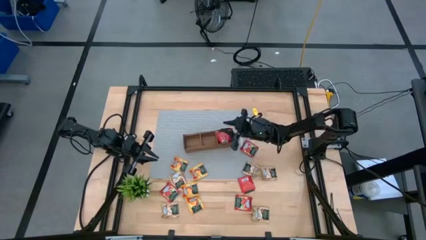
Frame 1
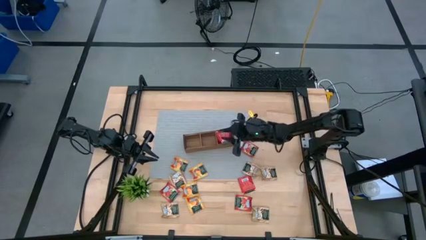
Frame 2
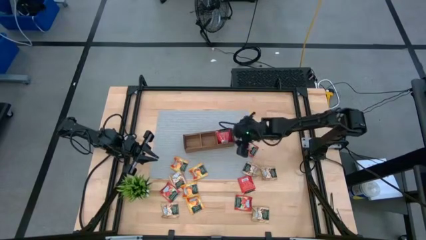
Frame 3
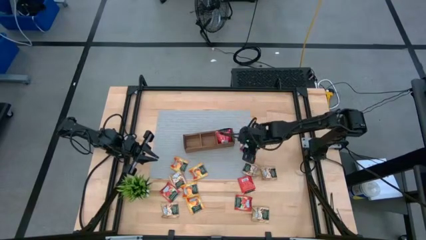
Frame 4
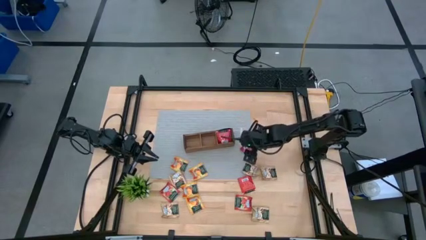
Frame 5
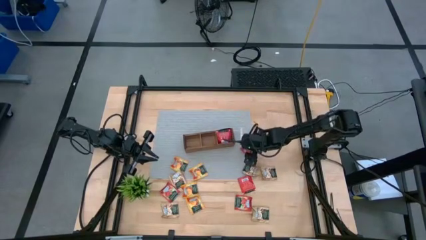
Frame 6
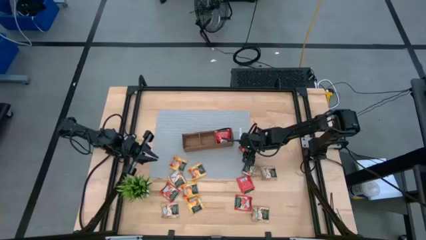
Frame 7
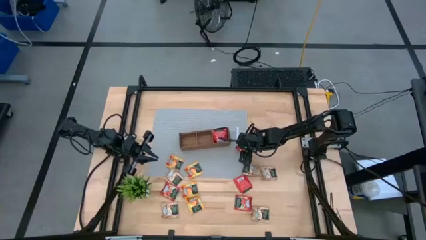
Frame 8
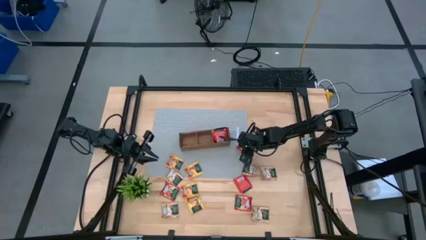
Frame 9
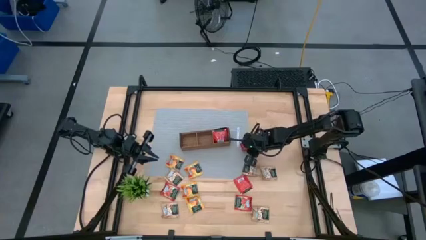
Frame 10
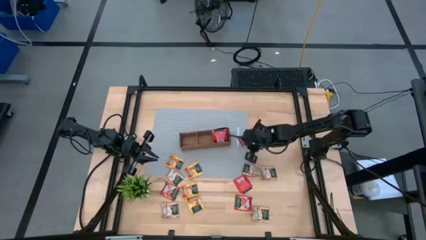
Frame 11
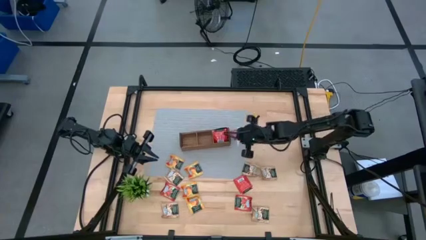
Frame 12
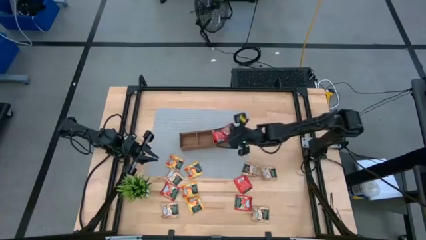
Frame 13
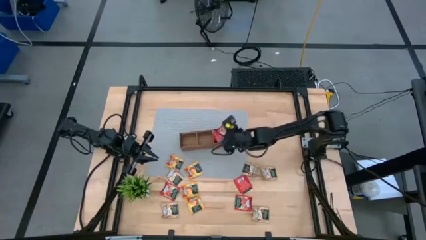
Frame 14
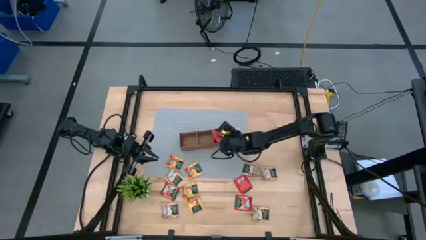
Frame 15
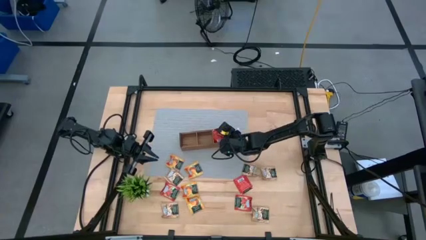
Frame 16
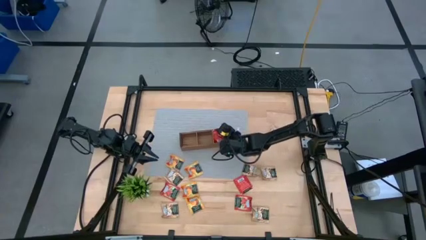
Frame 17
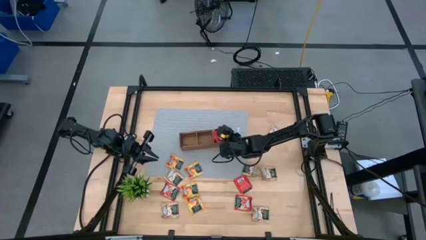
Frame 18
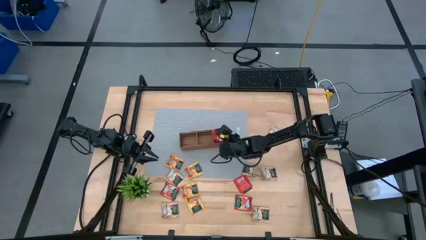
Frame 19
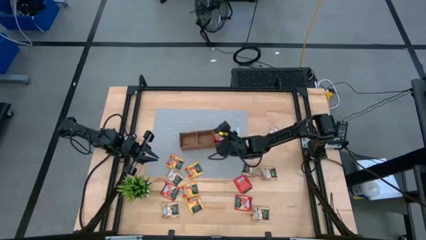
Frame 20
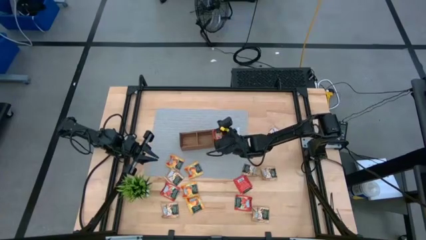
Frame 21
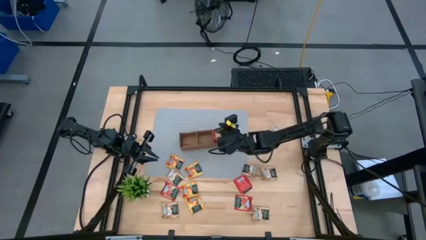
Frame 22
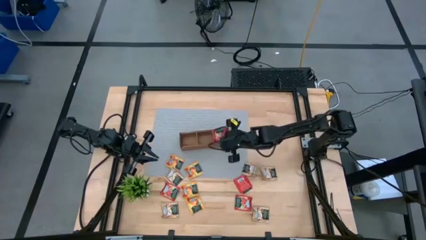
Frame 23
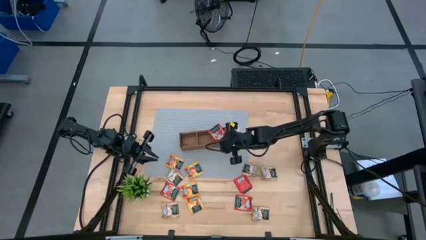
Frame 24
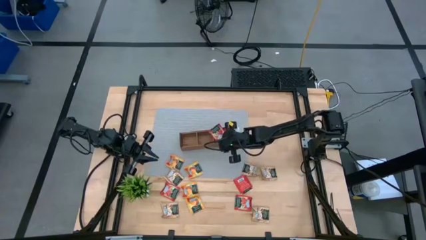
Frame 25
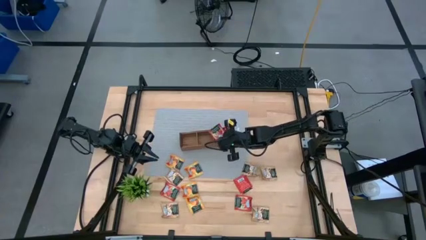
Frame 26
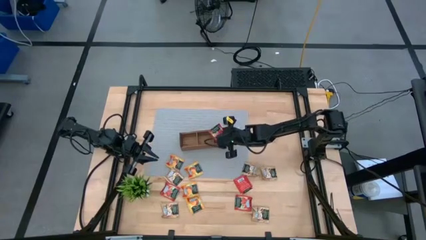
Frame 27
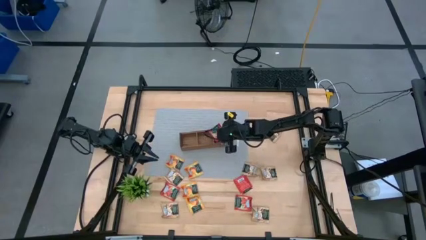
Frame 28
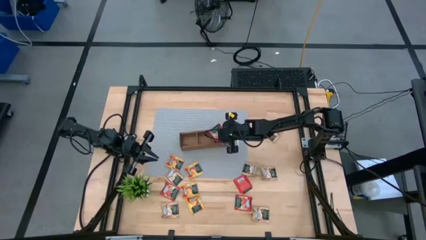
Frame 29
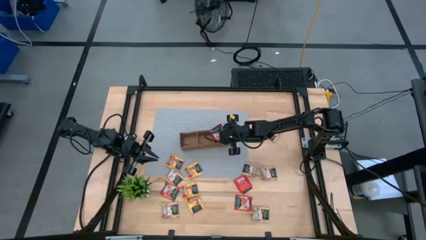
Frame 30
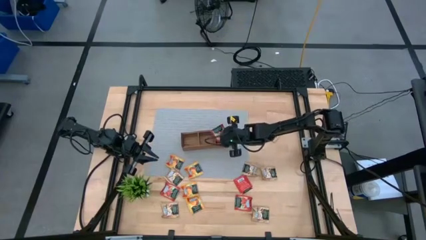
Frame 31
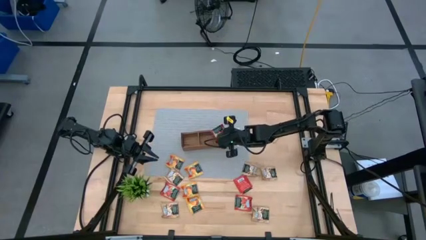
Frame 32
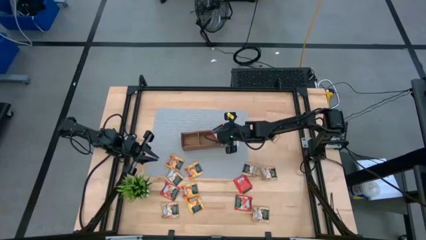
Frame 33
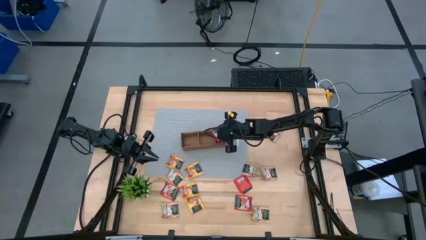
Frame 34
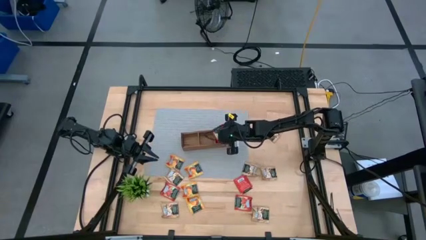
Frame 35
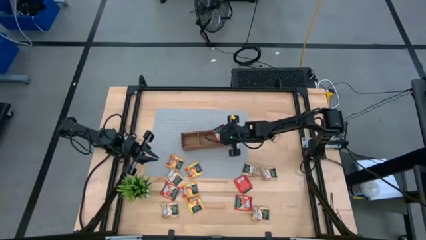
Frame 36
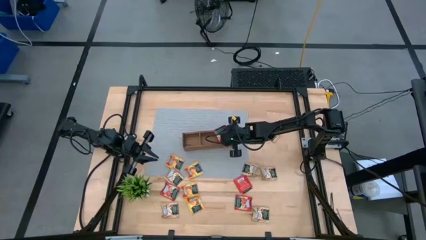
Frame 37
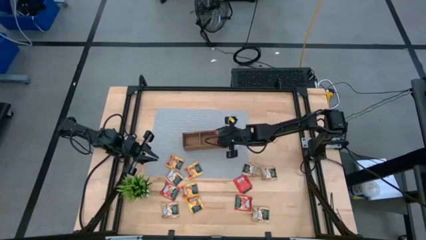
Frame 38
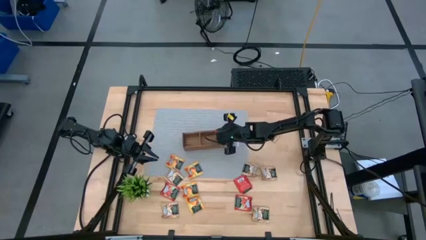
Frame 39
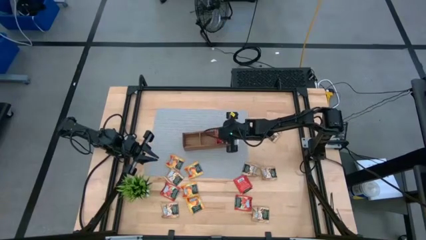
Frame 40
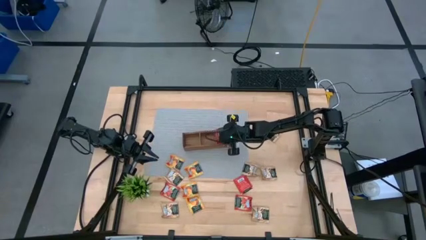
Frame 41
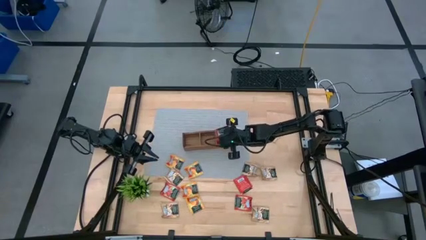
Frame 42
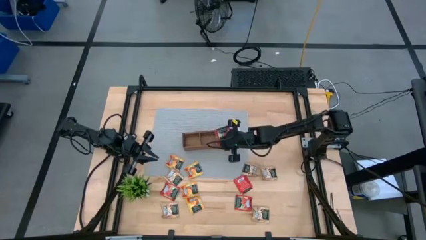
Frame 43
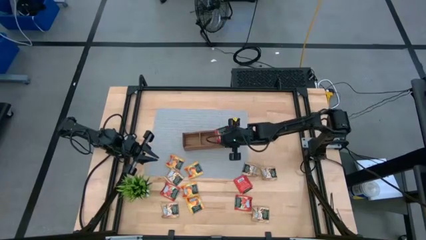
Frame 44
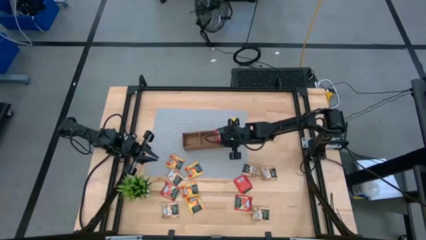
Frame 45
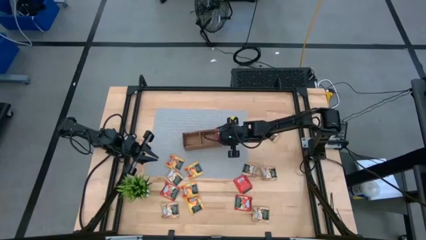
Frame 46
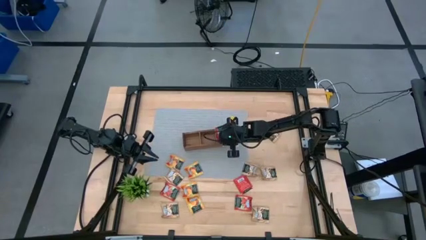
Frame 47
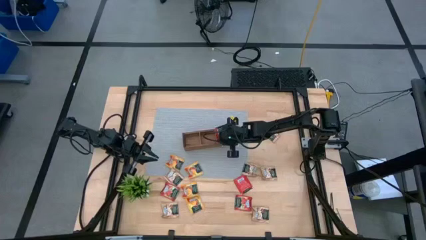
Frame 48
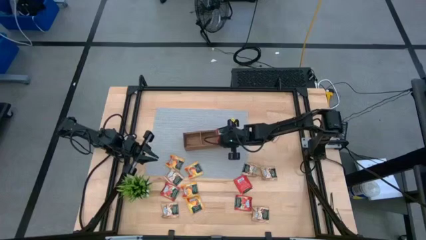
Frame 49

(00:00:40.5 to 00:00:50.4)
Task: Pick & Place Tea
Put the red tea bag into the wooden organizer

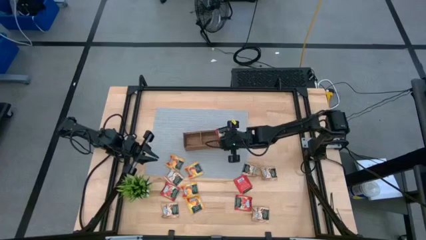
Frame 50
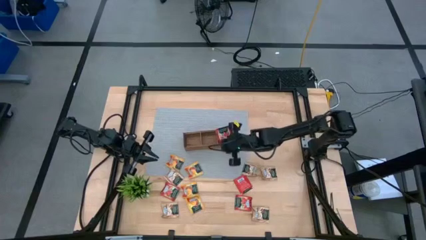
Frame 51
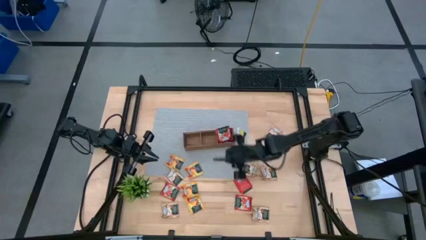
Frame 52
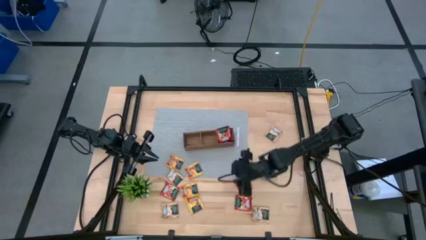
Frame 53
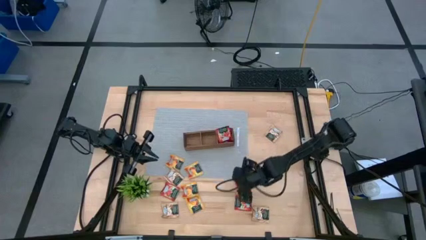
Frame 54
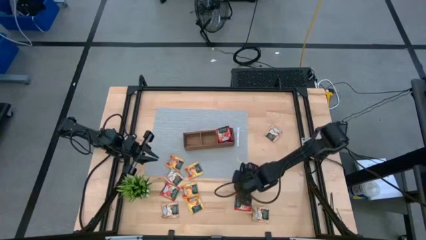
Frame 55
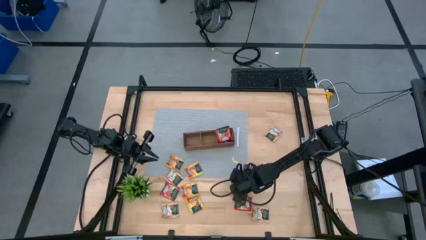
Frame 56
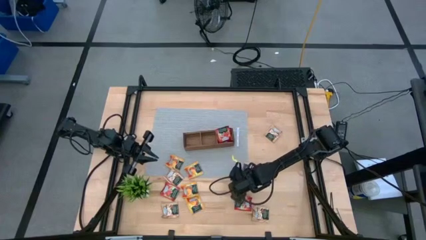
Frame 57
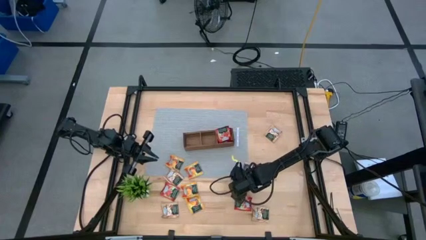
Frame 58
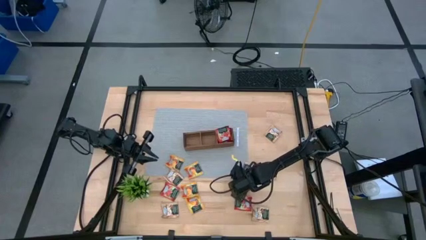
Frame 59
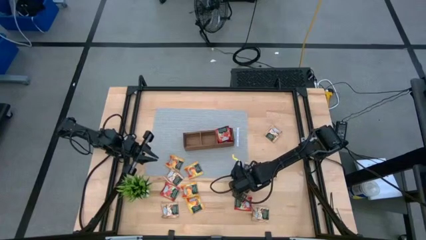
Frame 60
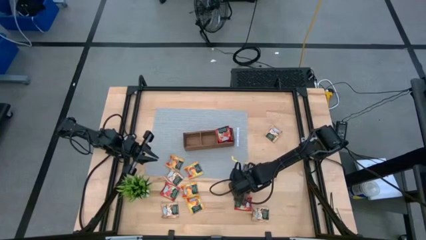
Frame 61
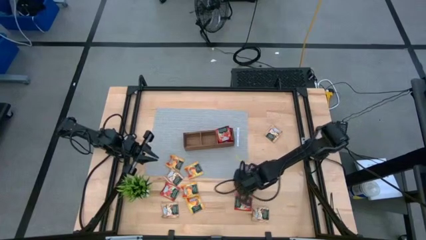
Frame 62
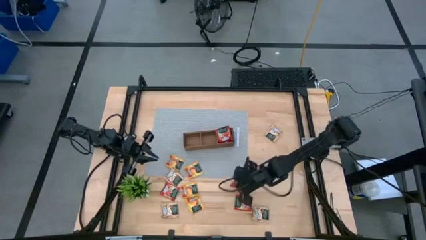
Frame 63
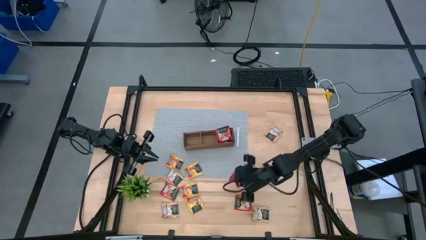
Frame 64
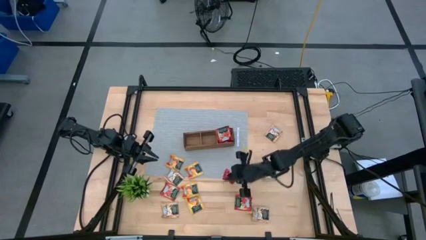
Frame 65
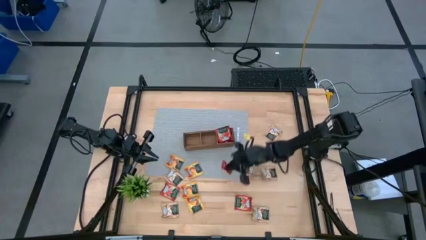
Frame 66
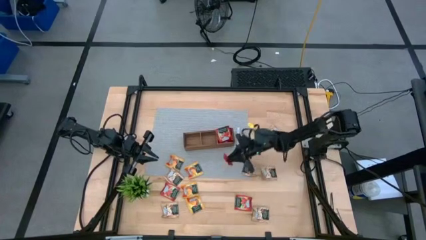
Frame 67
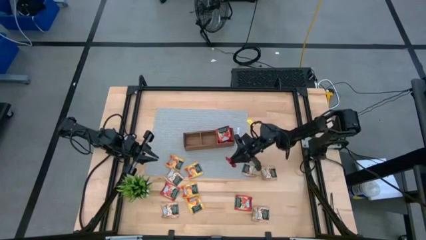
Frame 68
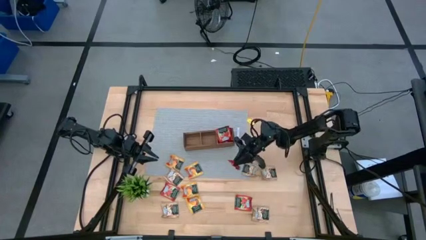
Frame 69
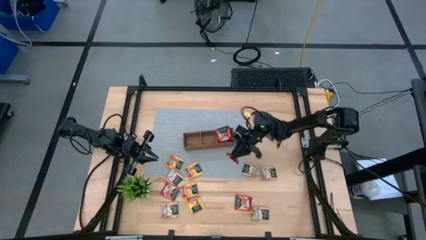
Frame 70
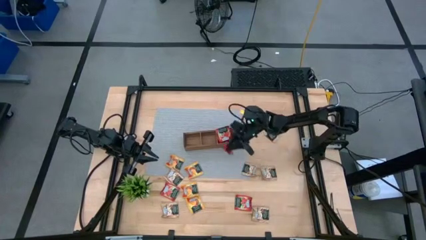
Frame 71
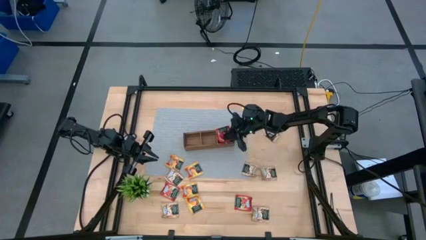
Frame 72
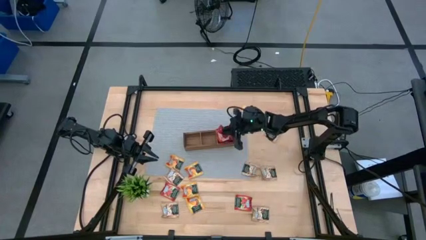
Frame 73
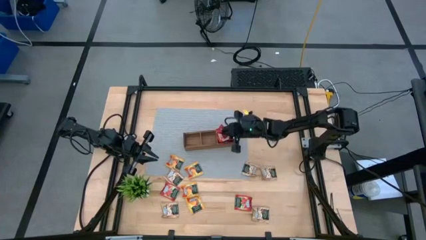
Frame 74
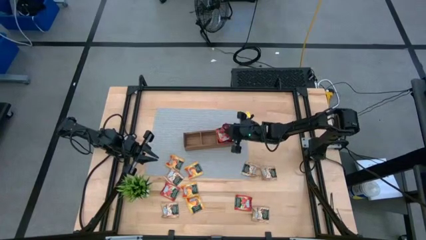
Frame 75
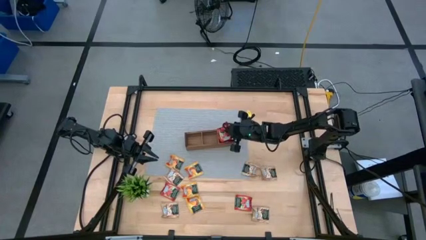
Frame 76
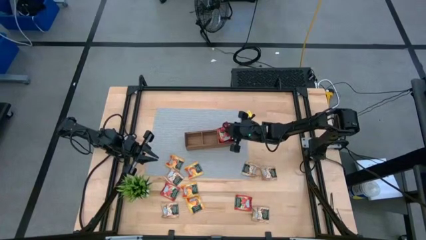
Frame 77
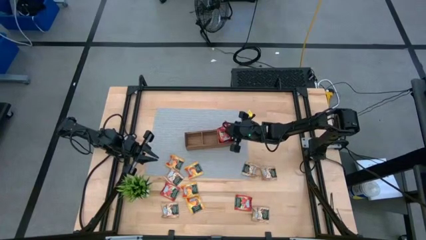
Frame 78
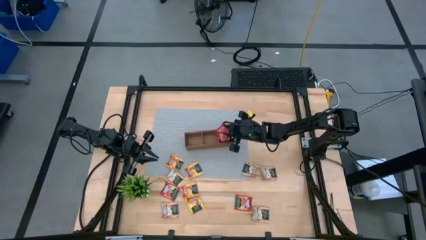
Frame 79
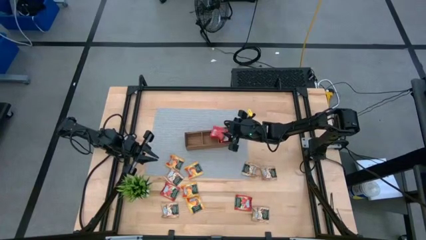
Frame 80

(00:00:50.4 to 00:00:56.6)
Put the red tea bag into the wooden organizer
